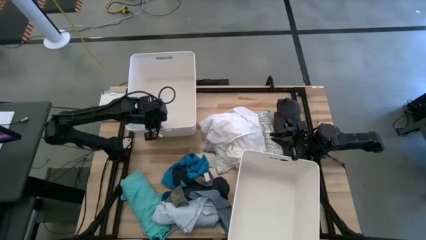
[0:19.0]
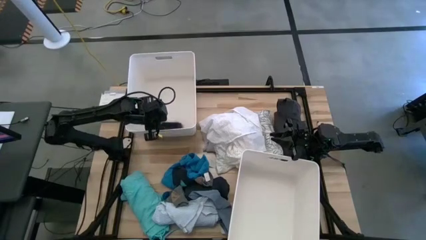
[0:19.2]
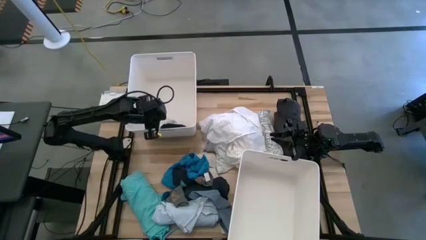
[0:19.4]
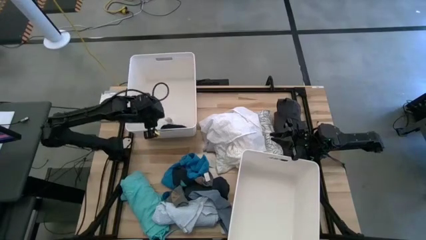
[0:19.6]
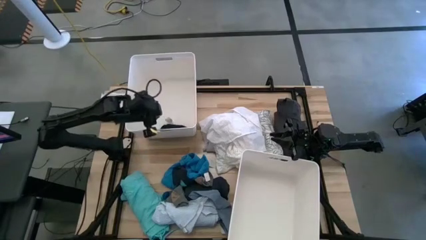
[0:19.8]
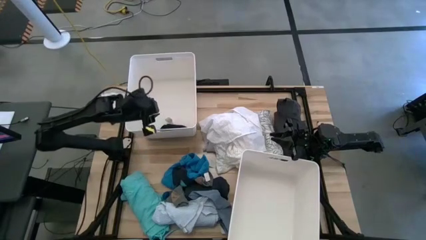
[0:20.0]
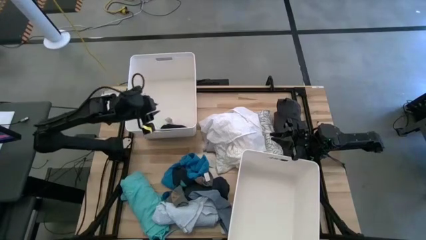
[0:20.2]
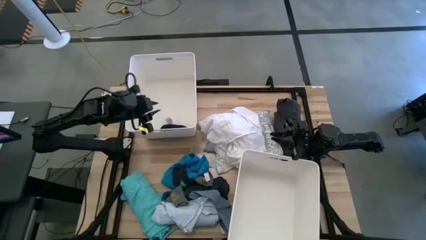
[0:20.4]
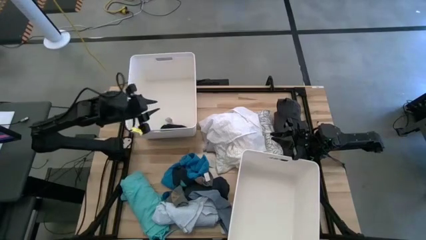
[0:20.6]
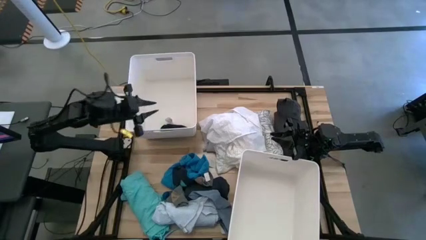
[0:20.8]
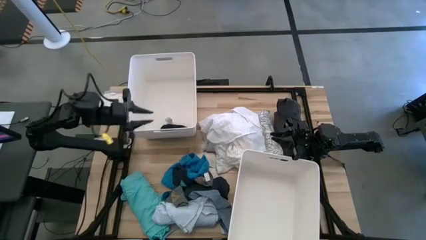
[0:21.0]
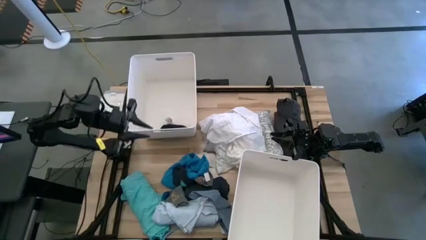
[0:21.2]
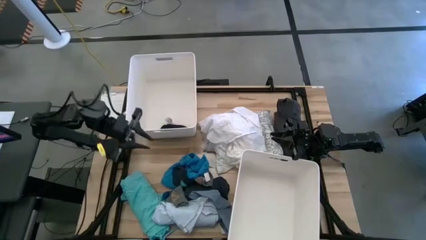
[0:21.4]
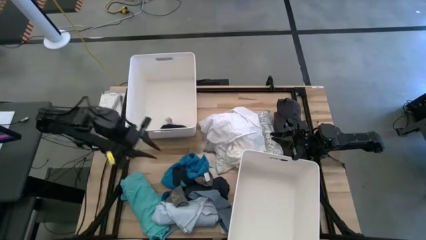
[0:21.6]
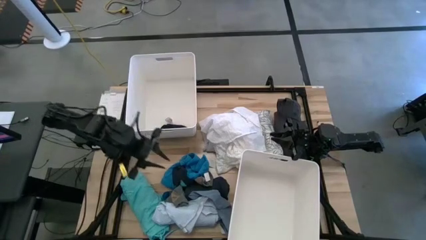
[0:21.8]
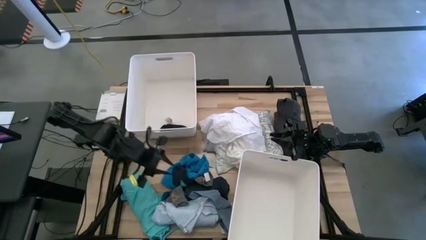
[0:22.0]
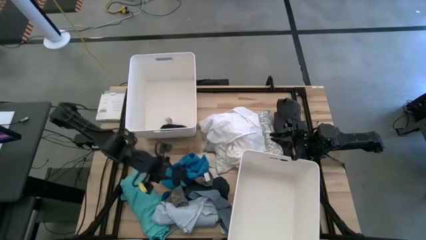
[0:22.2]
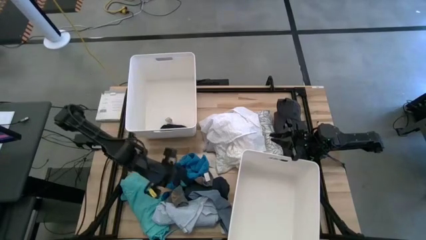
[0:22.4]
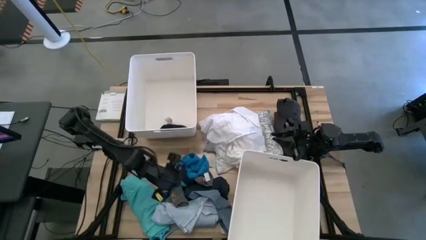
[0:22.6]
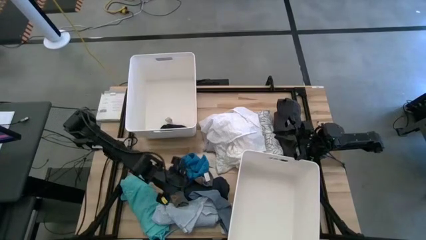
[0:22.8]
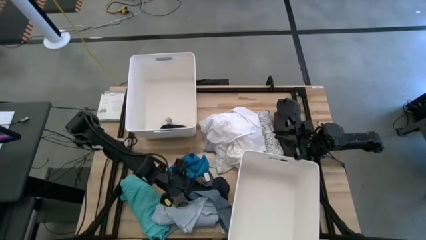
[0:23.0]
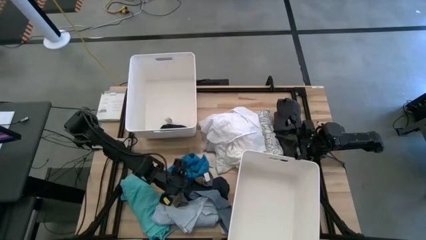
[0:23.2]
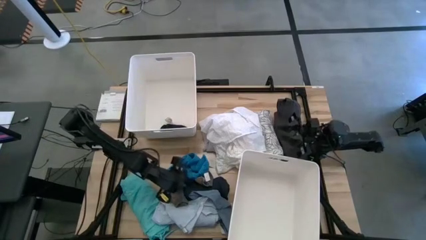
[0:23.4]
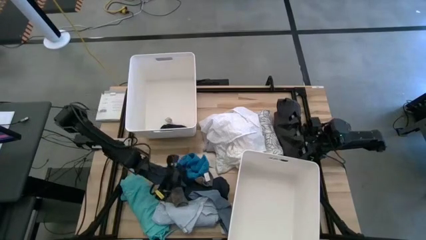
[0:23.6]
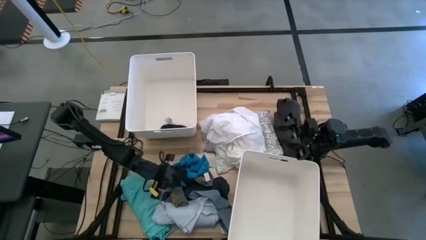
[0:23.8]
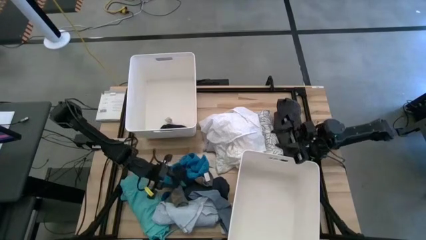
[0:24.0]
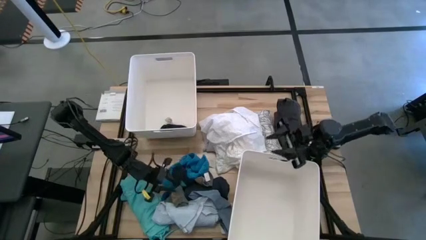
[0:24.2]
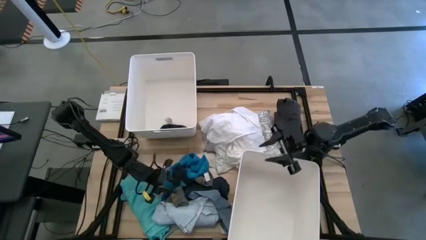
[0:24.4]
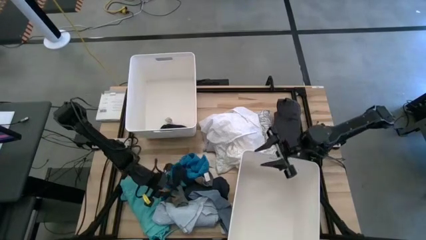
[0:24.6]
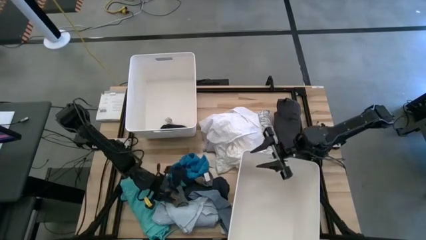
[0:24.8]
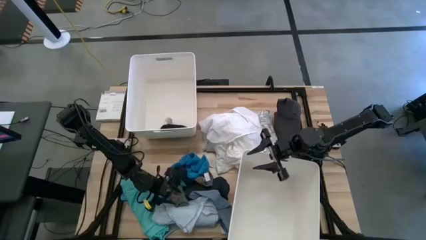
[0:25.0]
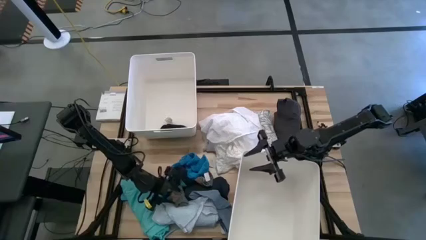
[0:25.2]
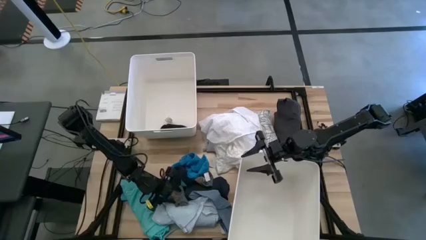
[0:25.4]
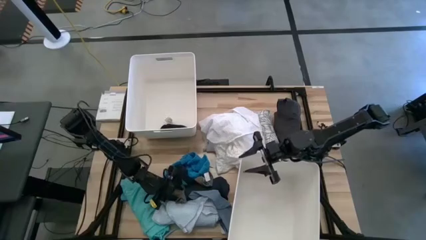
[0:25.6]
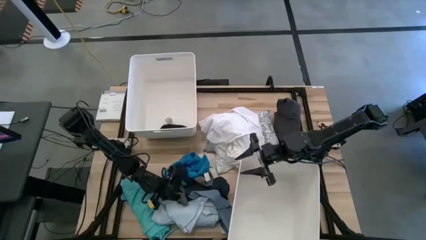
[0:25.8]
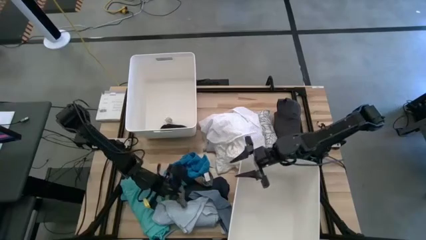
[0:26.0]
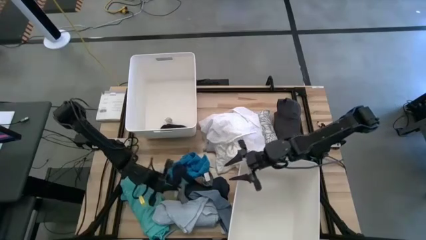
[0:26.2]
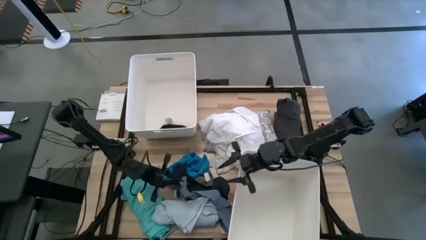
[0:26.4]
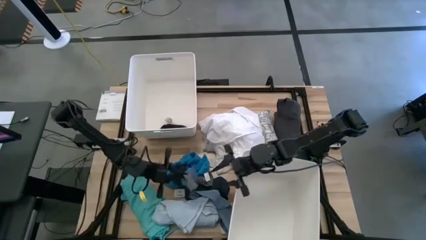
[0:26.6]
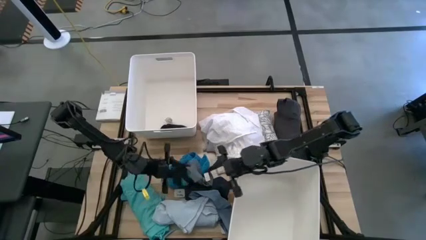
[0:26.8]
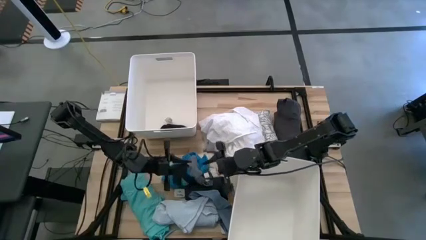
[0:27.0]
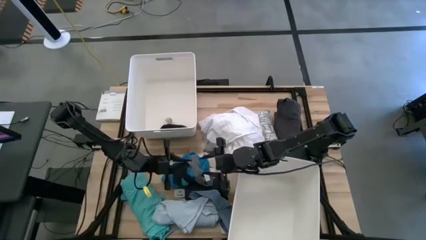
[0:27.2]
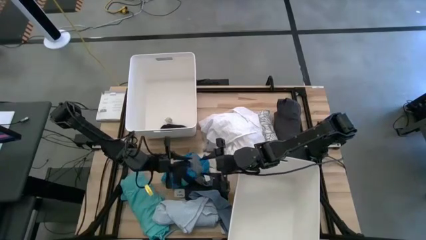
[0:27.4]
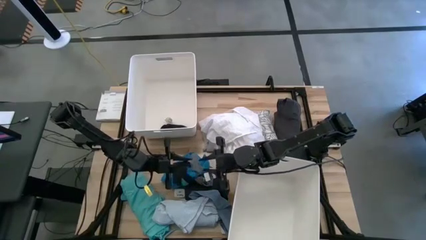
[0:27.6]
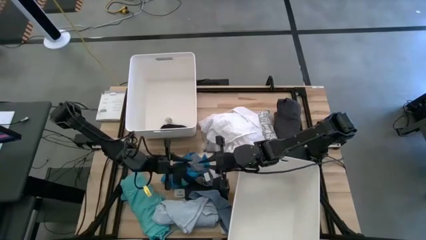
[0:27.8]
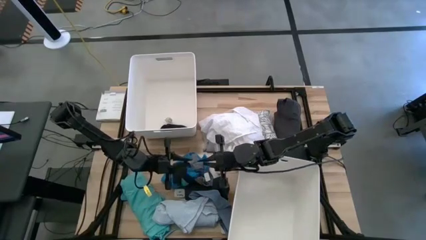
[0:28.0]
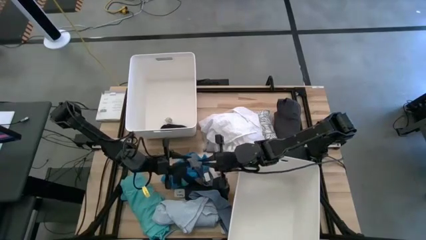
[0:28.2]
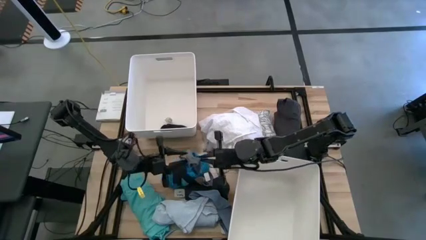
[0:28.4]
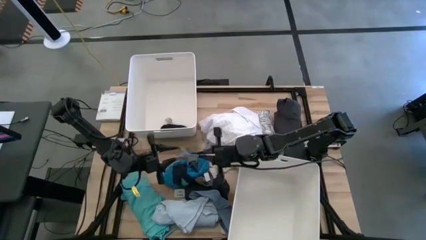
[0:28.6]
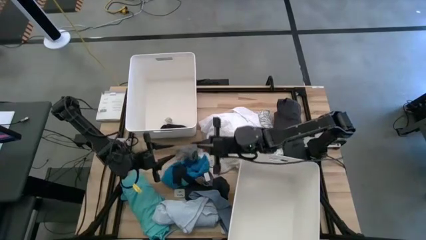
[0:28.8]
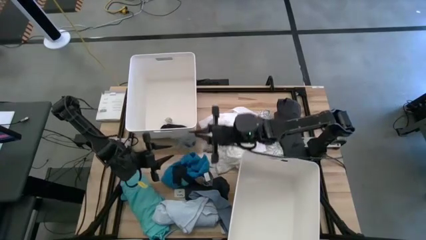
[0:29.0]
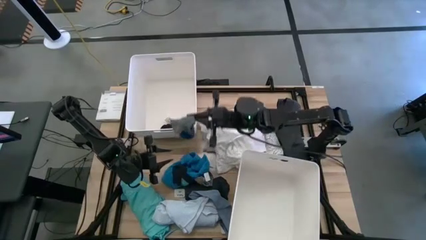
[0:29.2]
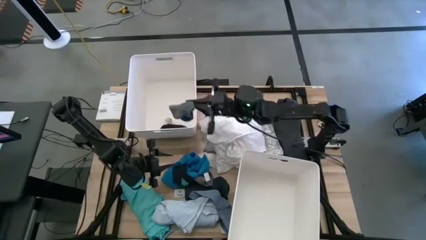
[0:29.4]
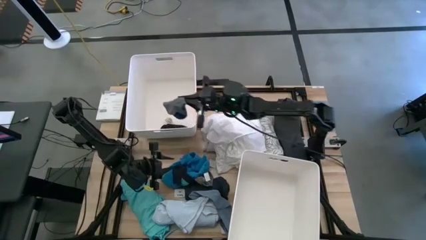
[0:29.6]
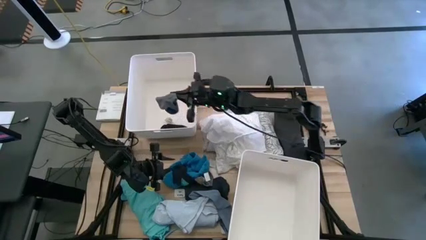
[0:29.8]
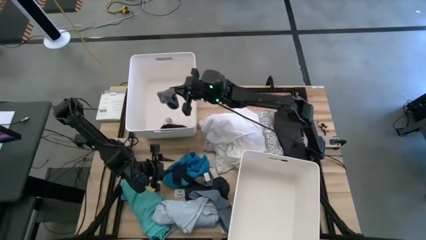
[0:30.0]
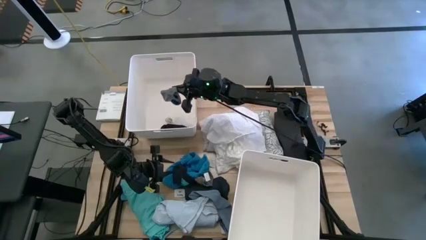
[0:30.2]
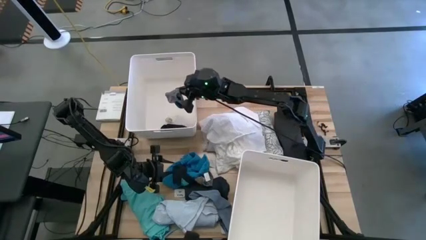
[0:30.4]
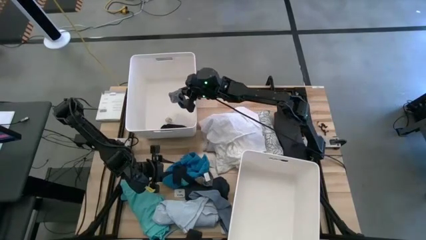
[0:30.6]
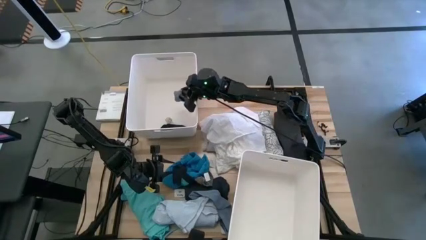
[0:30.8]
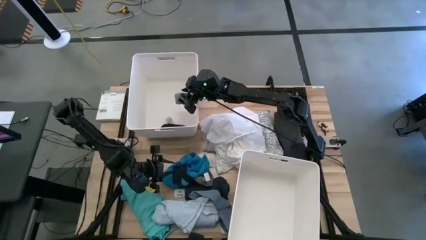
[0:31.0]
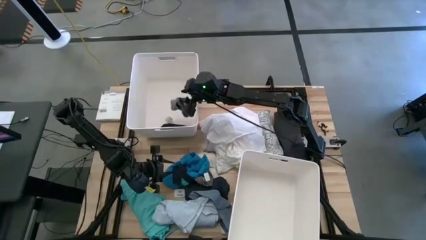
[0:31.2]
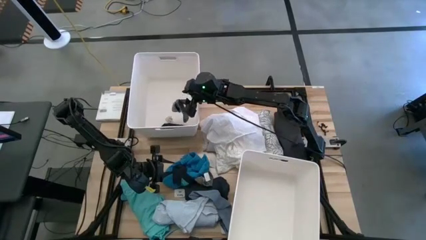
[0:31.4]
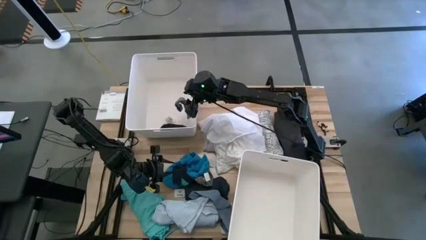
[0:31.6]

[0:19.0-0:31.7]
Task: Sort clothes
Put the gray sock into the top white laundry bin

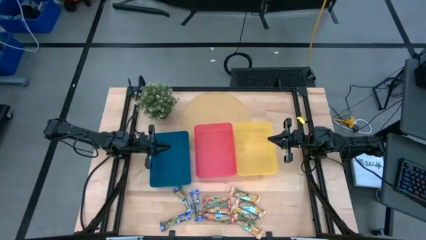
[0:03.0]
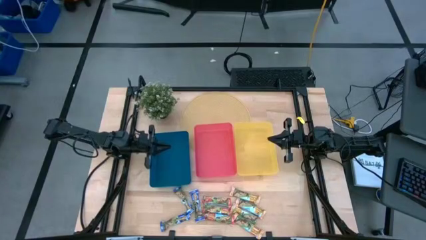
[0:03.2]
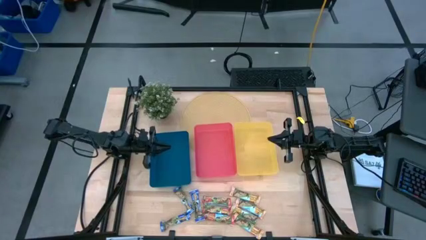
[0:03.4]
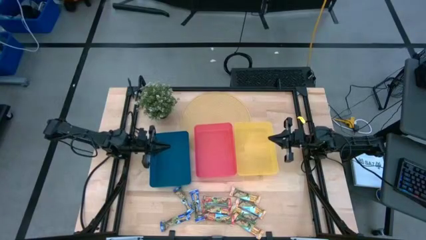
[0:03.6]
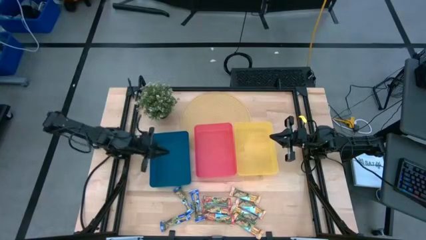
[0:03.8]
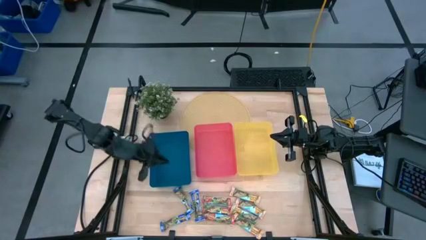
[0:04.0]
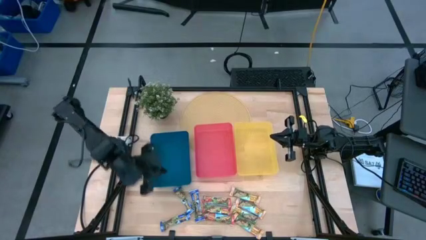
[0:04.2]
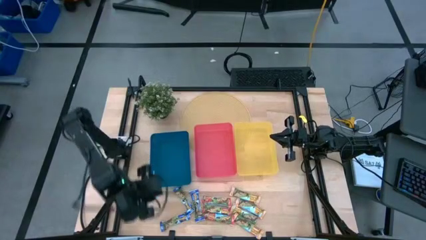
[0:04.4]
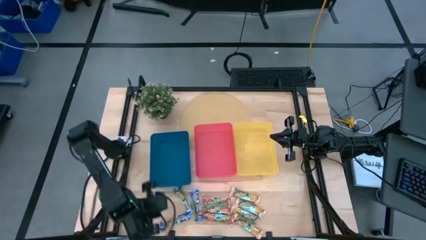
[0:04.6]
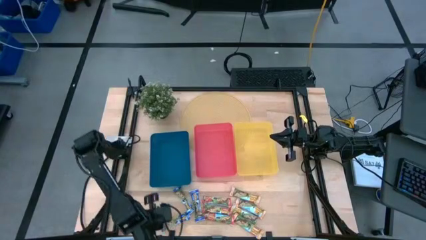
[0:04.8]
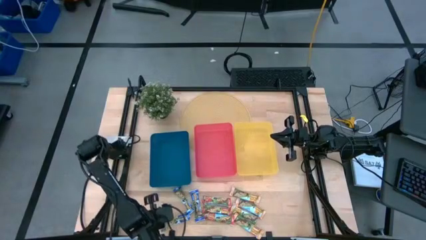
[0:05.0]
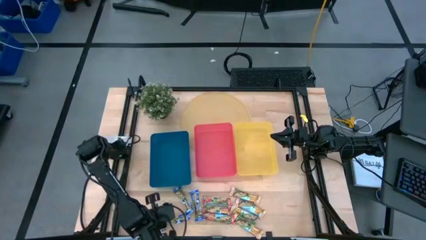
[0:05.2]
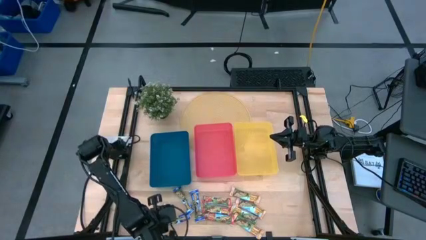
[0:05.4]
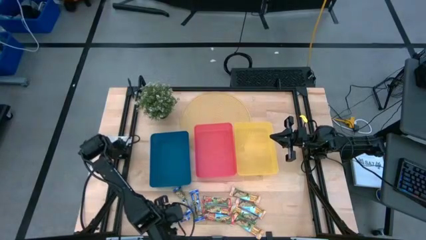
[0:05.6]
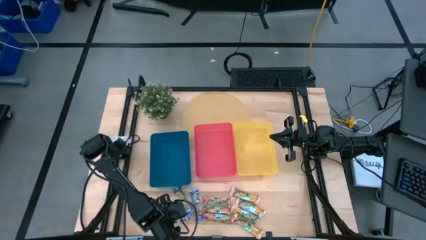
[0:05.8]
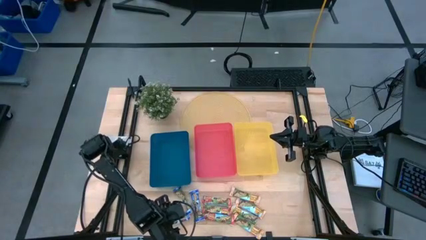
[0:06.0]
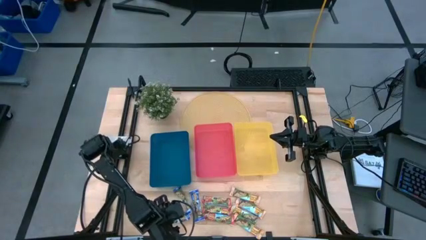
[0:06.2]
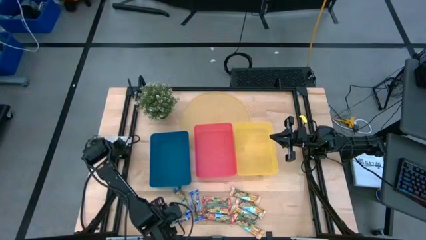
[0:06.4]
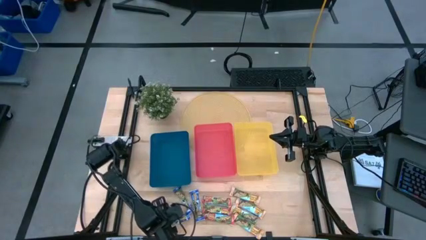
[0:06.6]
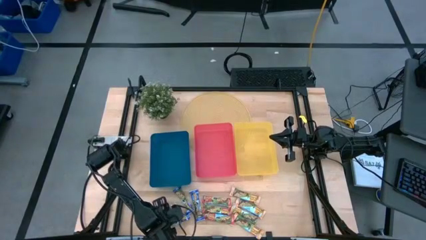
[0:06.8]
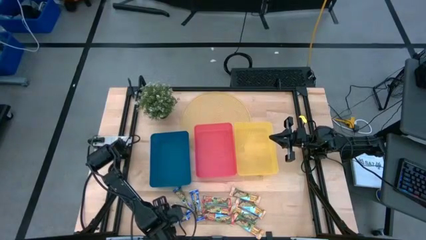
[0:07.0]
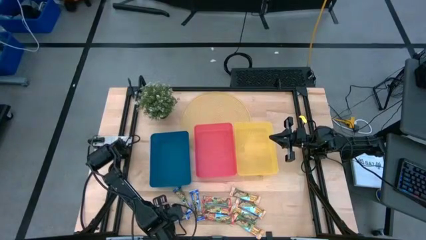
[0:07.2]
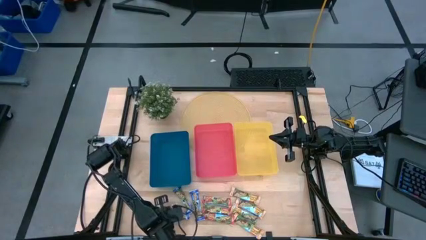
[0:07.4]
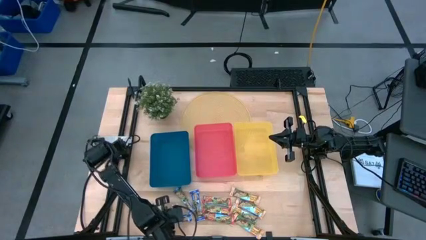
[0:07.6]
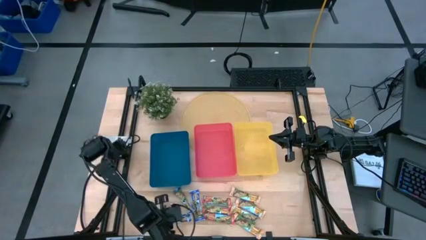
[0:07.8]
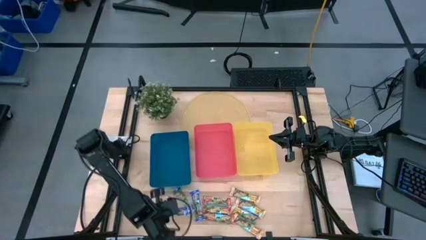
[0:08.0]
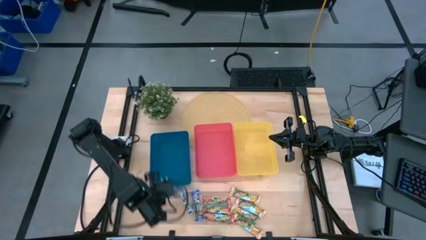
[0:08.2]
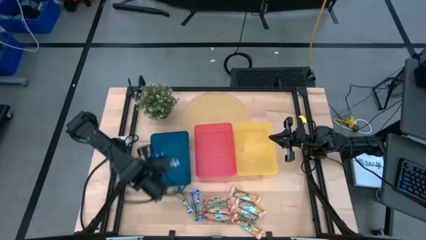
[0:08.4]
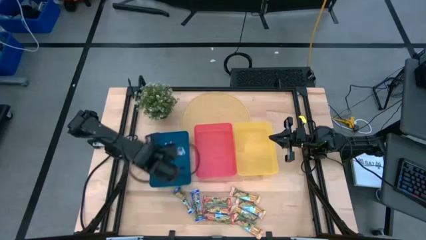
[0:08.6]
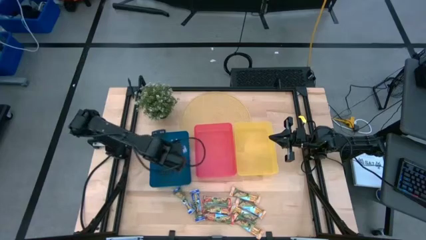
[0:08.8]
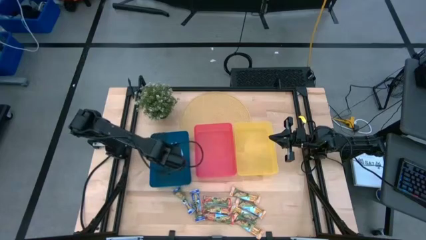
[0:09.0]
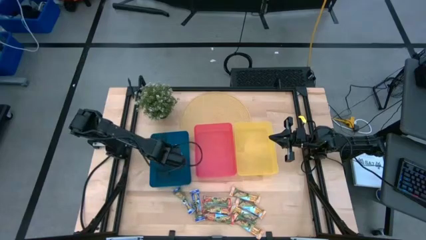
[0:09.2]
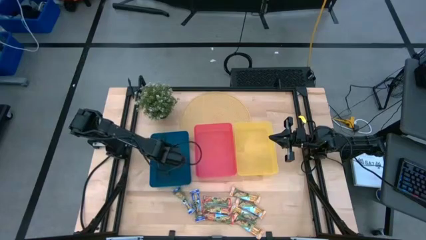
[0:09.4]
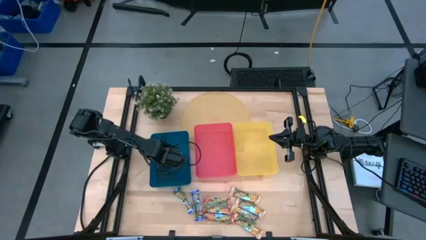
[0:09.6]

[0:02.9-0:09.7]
Task: Pick and place Granola Bars by type
Put the blue granola bar into the blue bin
